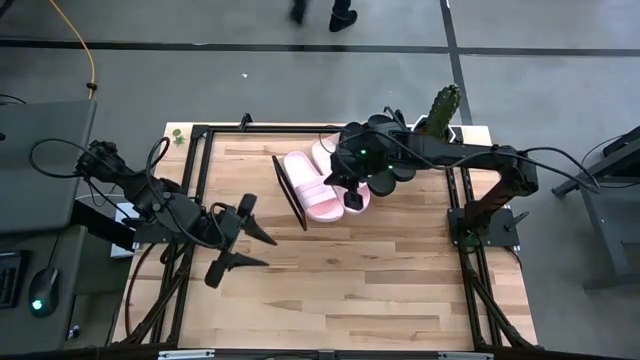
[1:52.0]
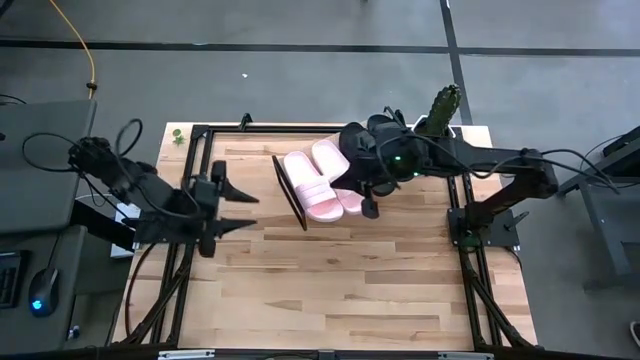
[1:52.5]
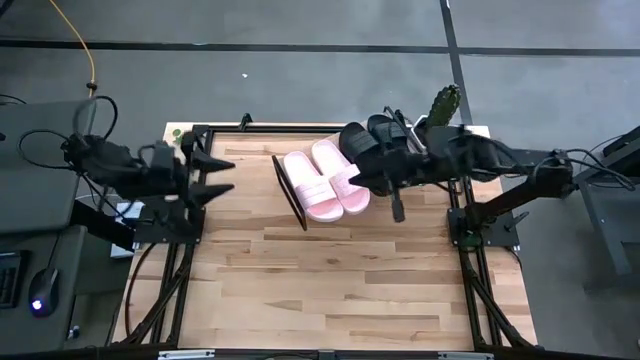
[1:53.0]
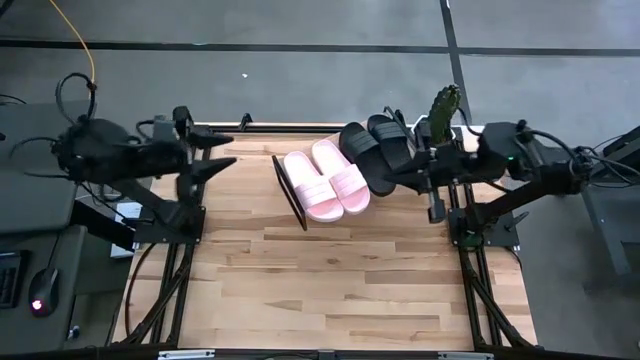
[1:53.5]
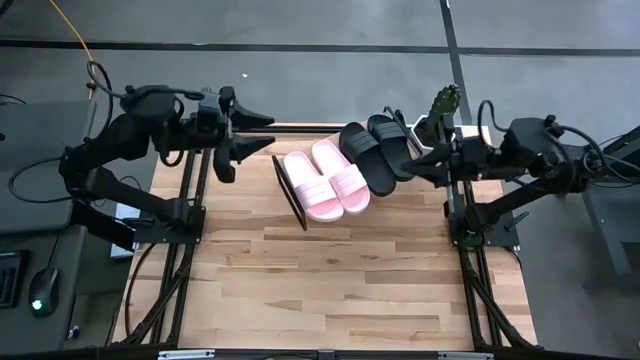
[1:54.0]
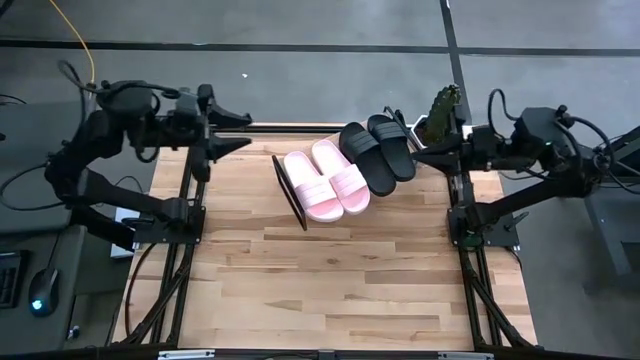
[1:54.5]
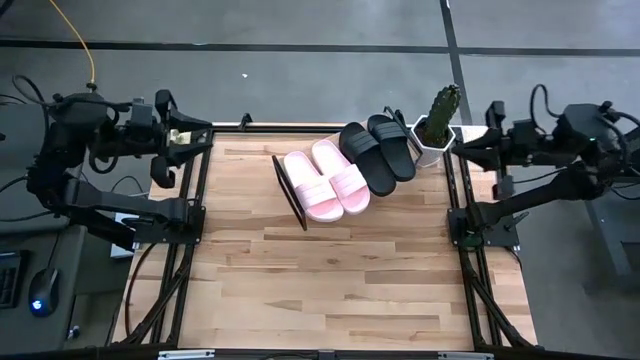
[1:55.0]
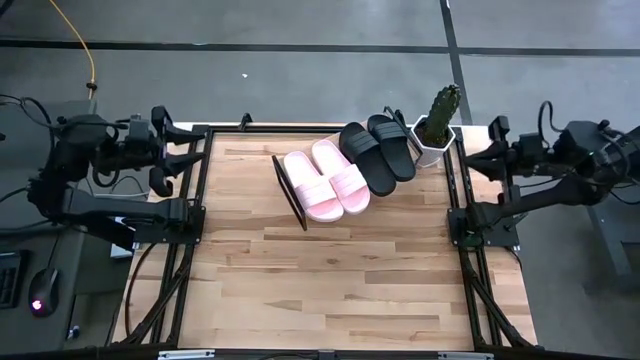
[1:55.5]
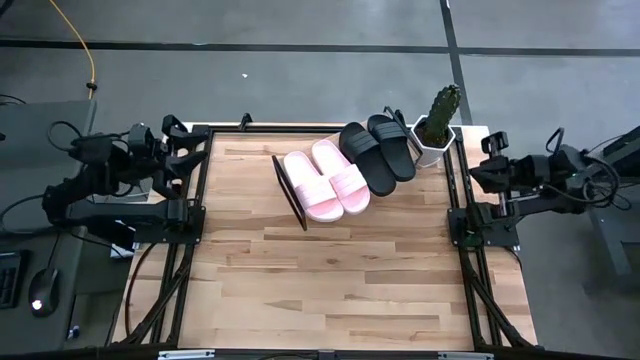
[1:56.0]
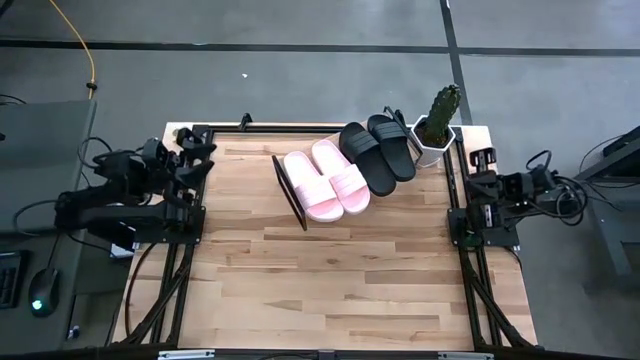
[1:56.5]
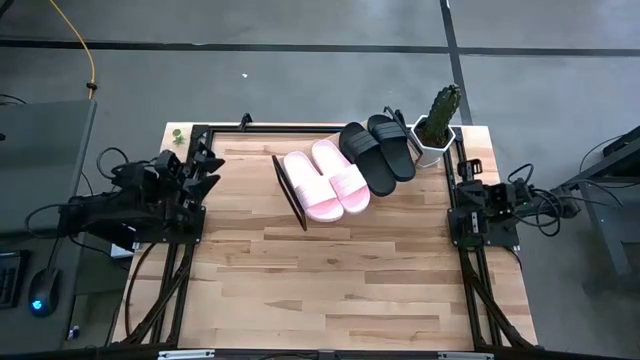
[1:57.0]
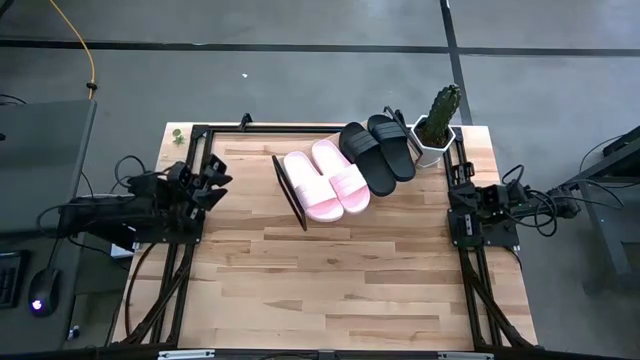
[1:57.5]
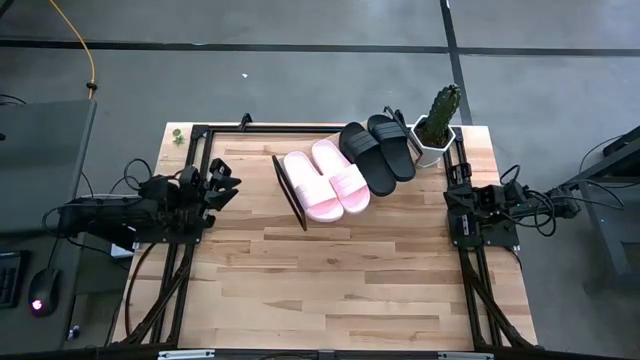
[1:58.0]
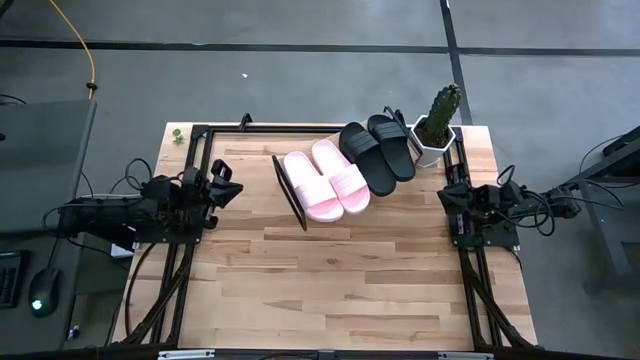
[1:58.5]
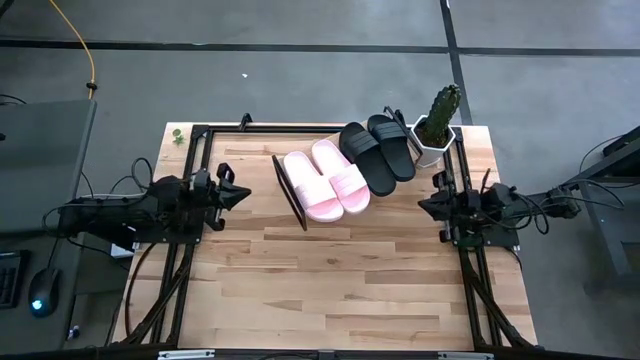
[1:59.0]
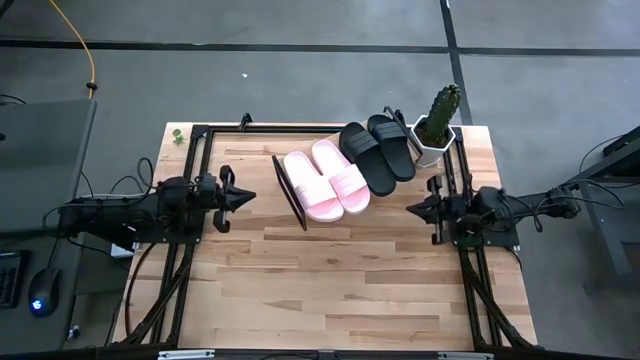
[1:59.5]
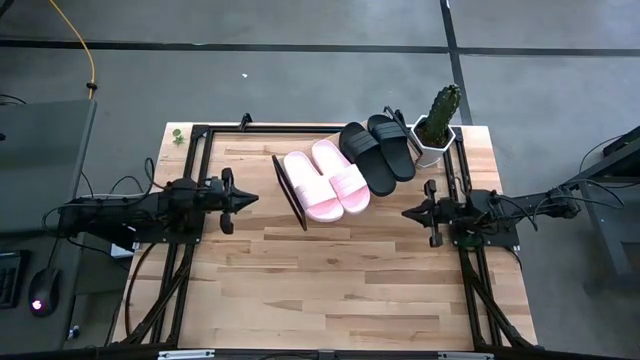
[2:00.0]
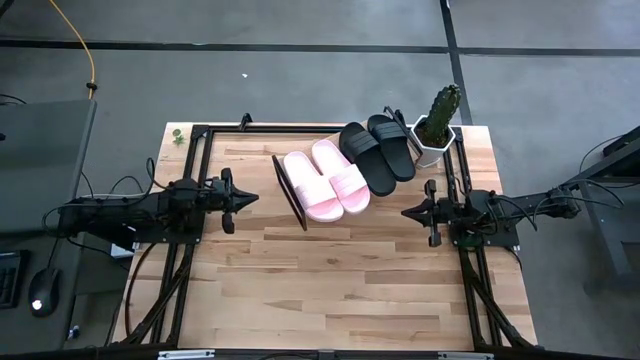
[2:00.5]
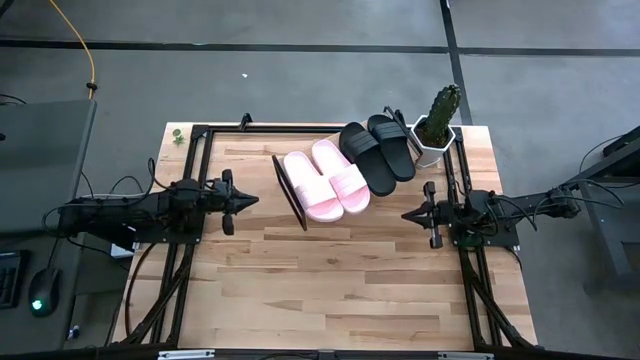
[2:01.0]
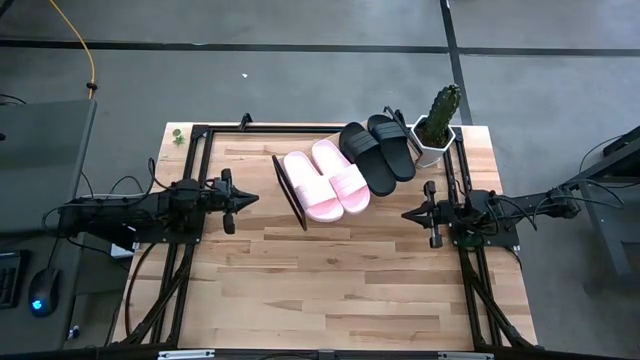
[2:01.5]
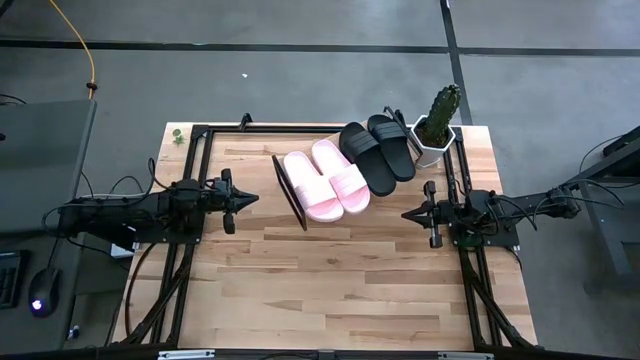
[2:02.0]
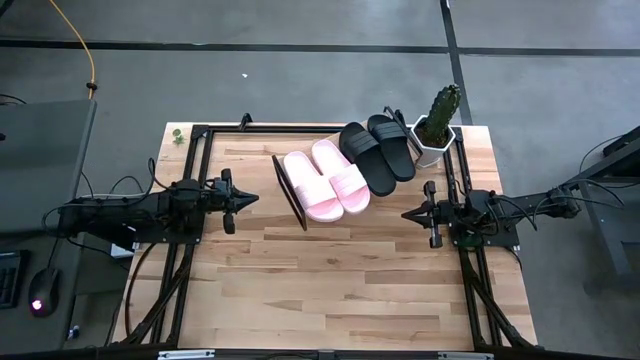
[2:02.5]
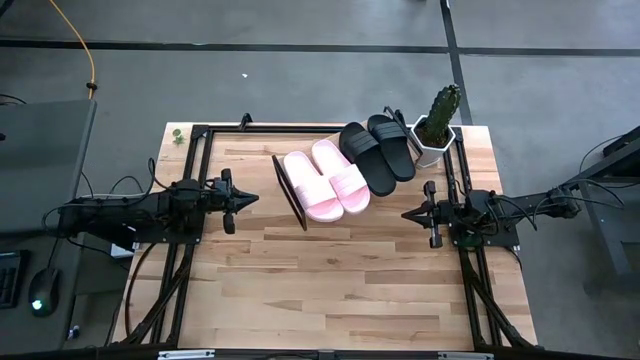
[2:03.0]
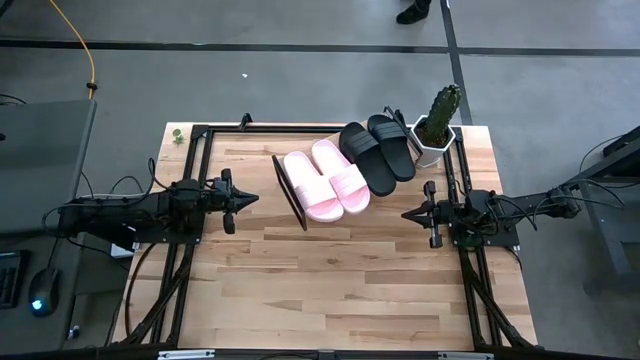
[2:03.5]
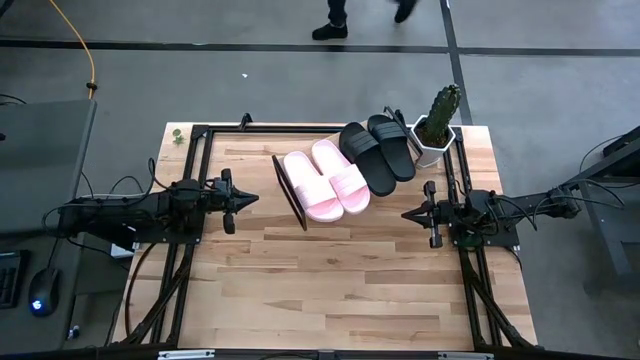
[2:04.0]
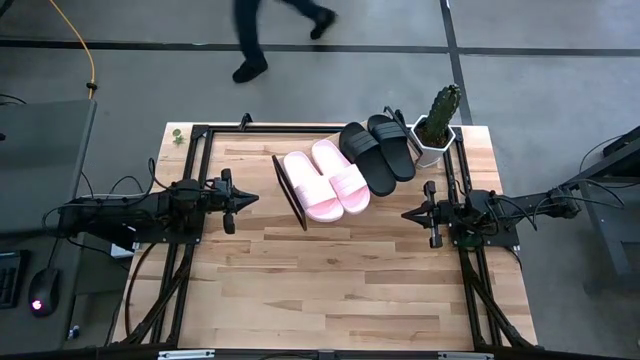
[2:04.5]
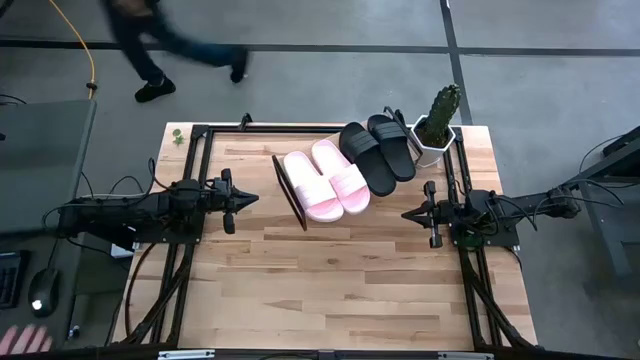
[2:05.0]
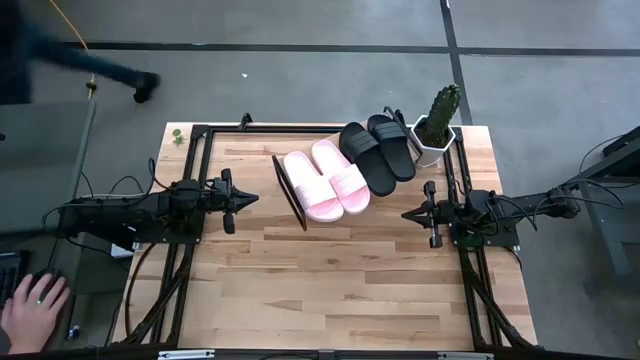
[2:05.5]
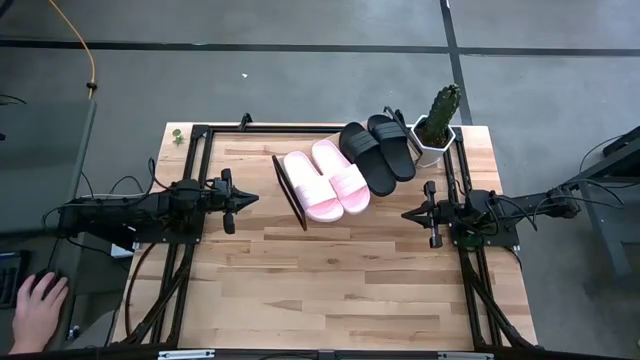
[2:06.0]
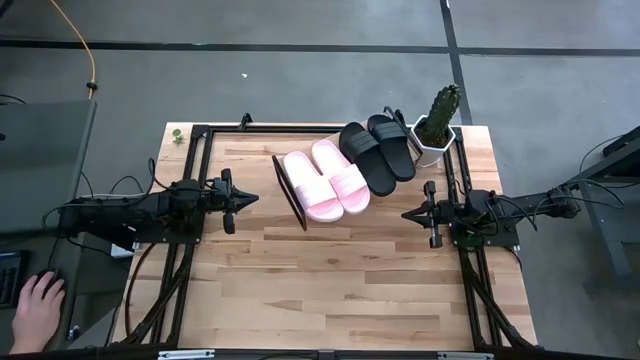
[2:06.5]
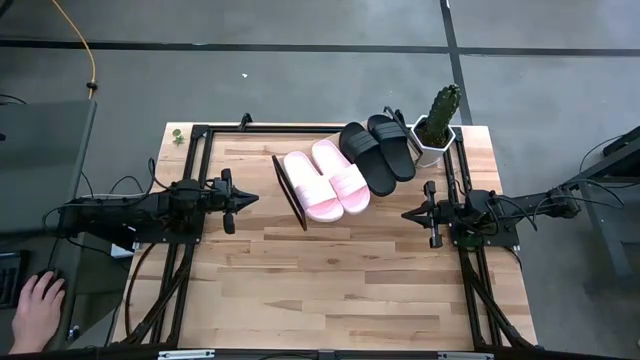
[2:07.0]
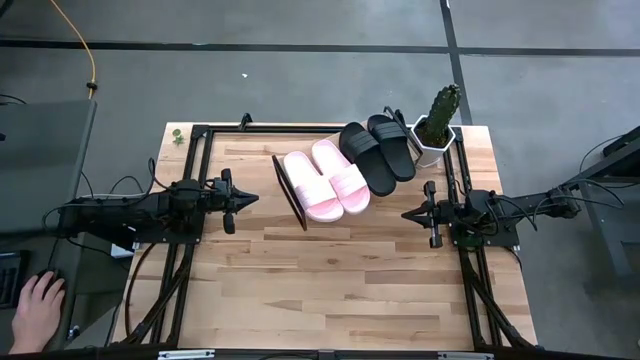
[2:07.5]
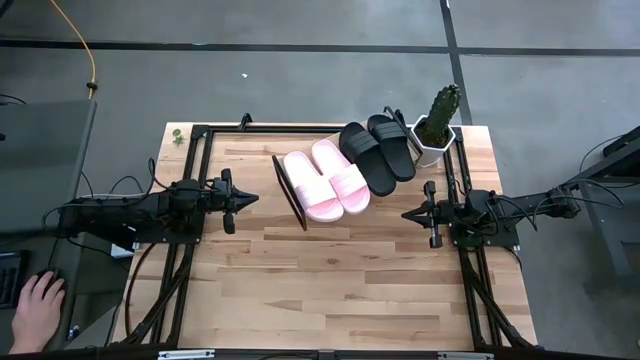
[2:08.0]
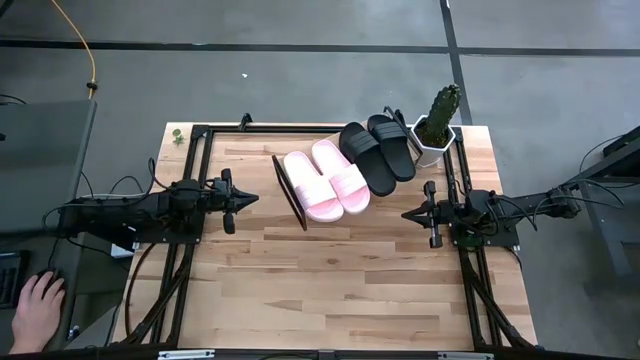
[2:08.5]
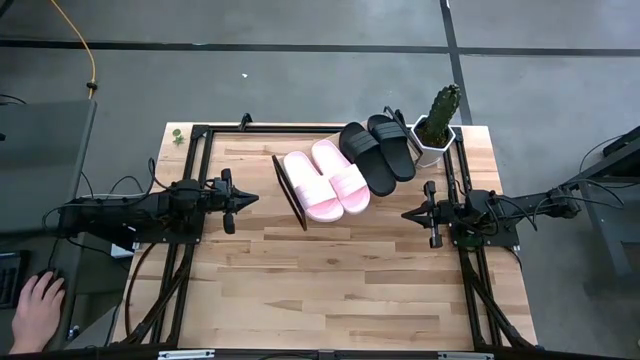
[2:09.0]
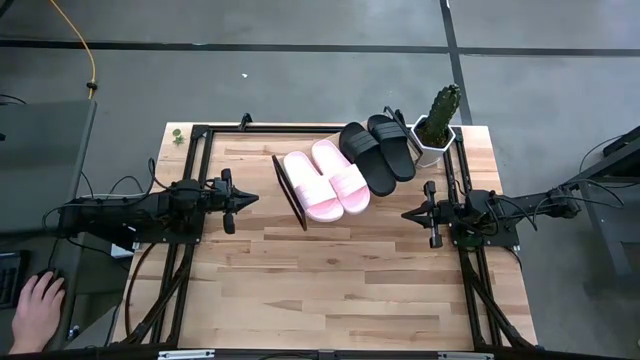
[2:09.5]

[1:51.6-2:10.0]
Task: Pick and place slides into the shelf
Return to Home Position
